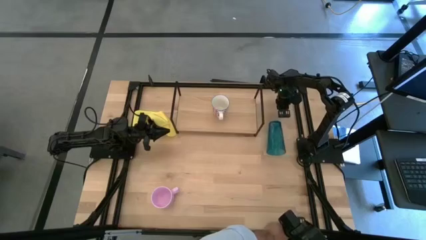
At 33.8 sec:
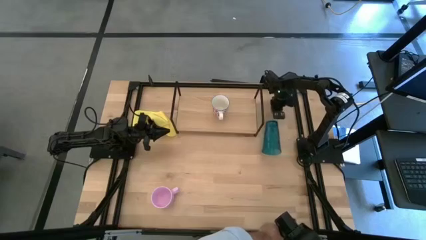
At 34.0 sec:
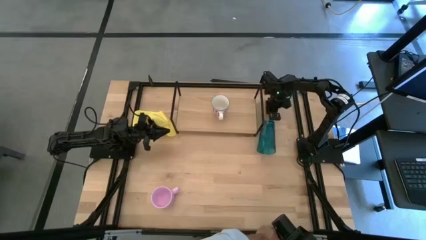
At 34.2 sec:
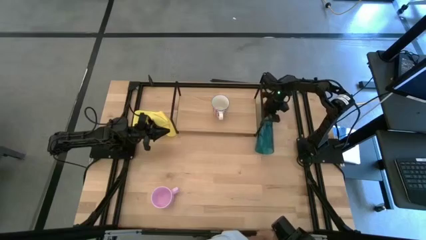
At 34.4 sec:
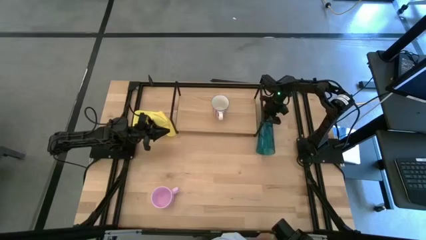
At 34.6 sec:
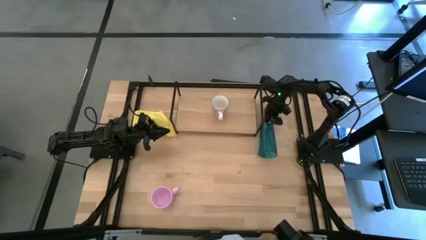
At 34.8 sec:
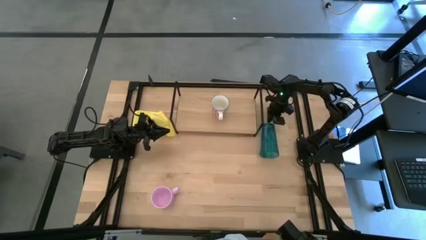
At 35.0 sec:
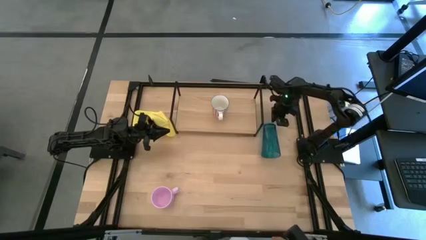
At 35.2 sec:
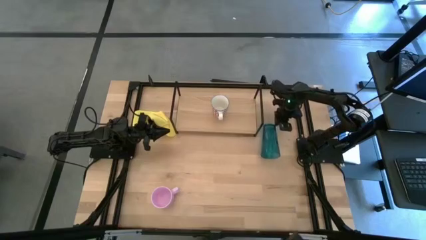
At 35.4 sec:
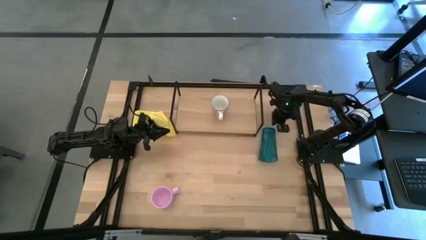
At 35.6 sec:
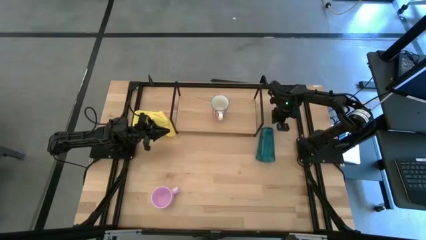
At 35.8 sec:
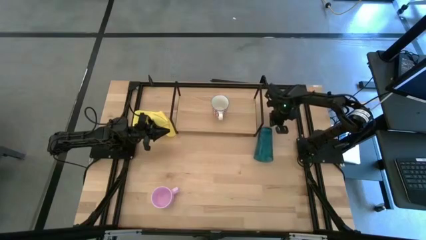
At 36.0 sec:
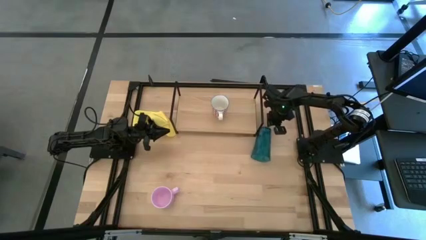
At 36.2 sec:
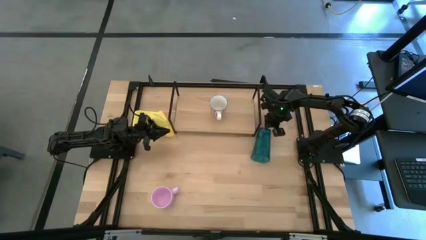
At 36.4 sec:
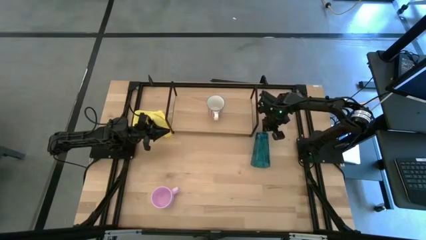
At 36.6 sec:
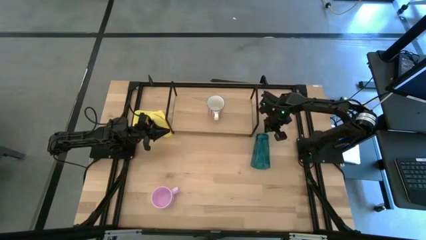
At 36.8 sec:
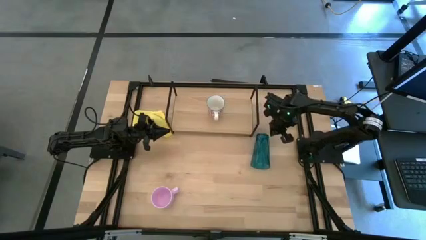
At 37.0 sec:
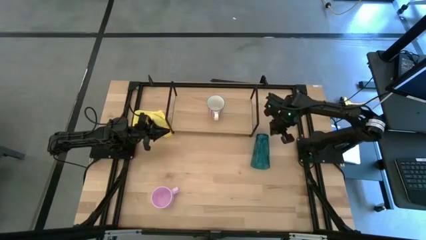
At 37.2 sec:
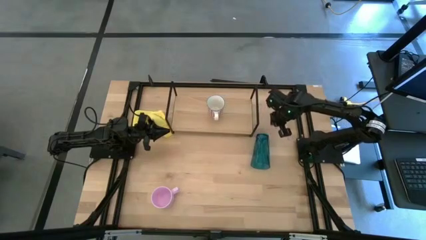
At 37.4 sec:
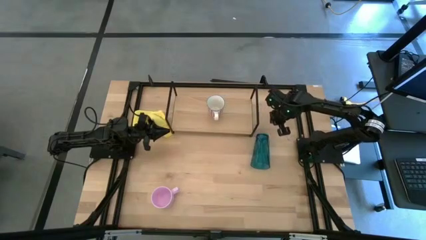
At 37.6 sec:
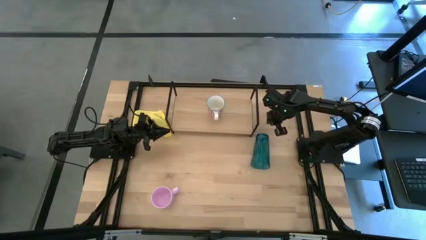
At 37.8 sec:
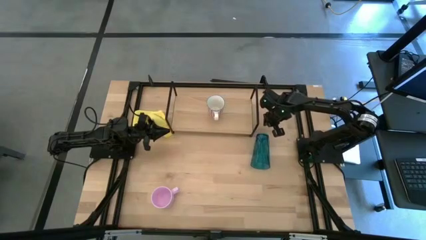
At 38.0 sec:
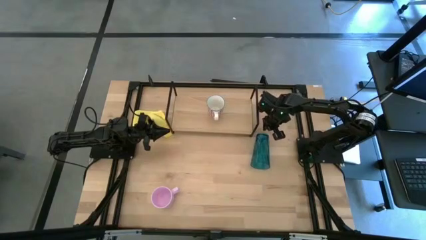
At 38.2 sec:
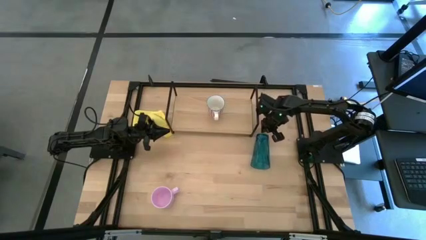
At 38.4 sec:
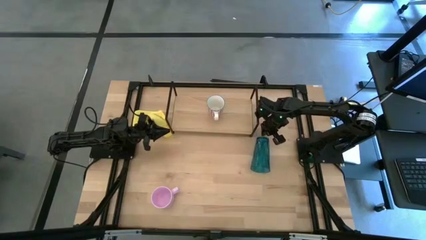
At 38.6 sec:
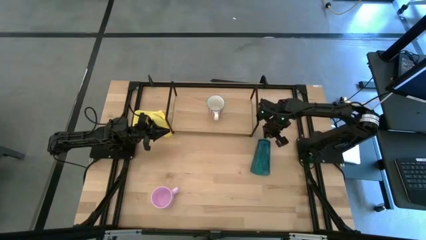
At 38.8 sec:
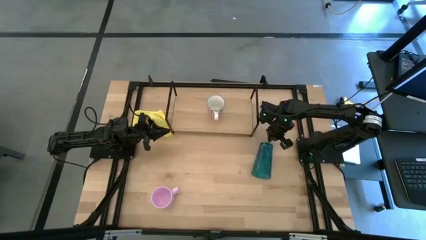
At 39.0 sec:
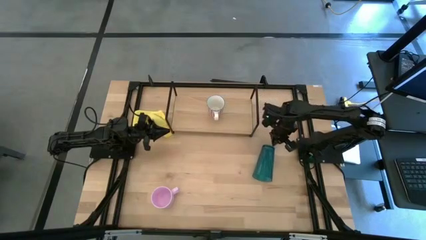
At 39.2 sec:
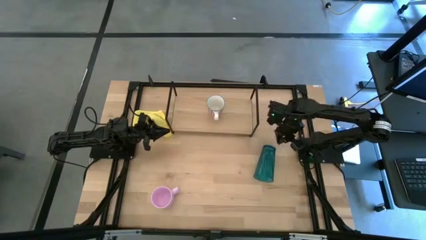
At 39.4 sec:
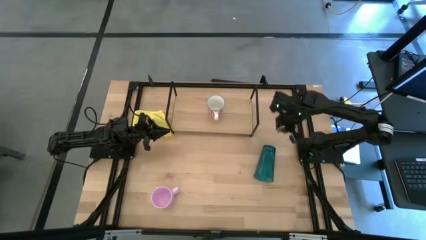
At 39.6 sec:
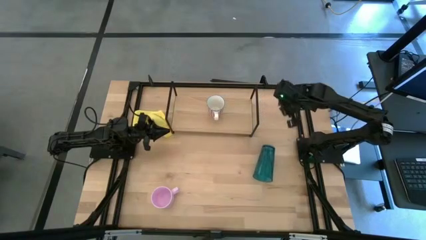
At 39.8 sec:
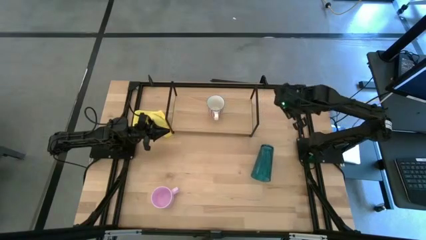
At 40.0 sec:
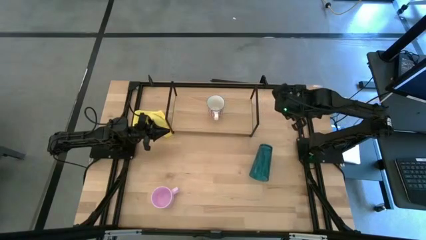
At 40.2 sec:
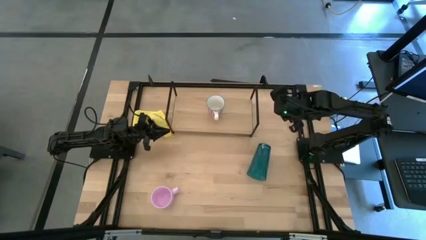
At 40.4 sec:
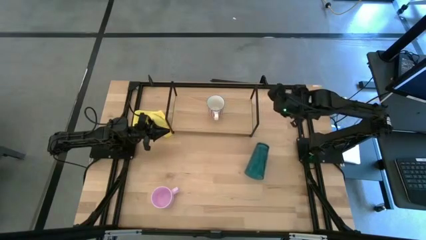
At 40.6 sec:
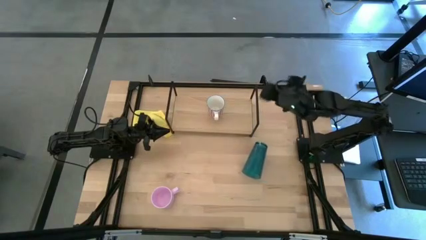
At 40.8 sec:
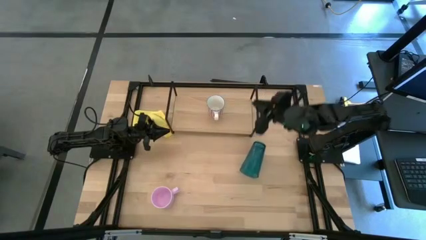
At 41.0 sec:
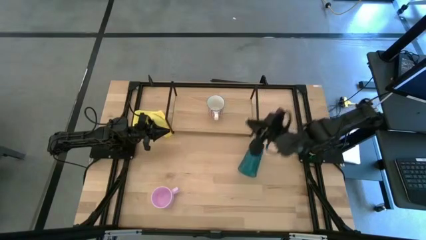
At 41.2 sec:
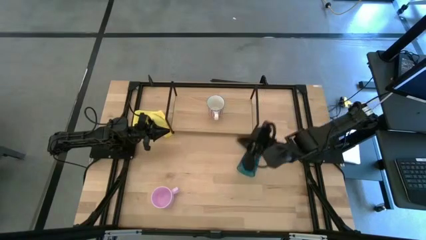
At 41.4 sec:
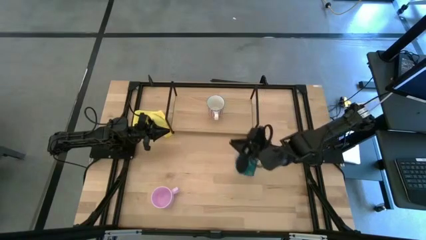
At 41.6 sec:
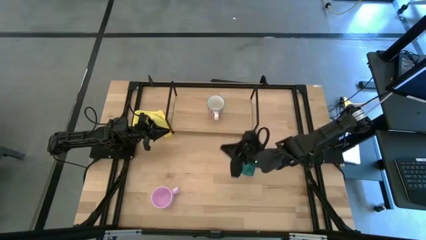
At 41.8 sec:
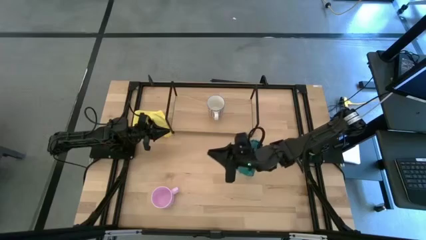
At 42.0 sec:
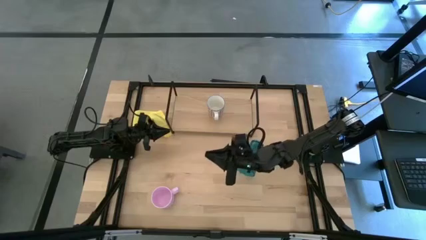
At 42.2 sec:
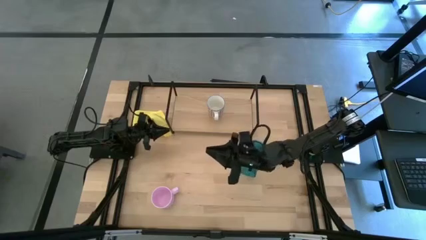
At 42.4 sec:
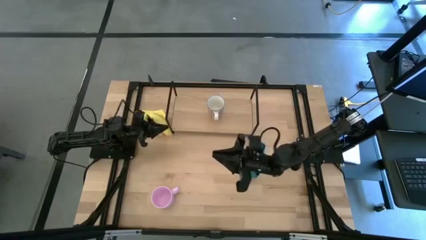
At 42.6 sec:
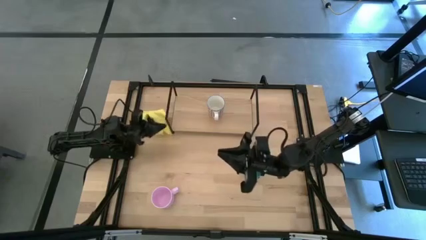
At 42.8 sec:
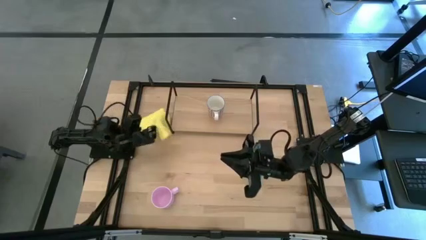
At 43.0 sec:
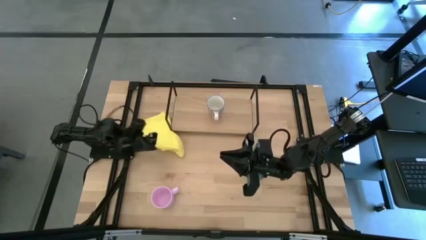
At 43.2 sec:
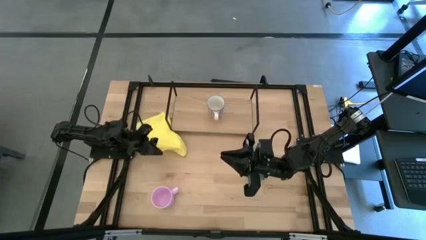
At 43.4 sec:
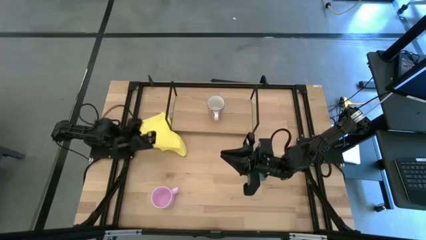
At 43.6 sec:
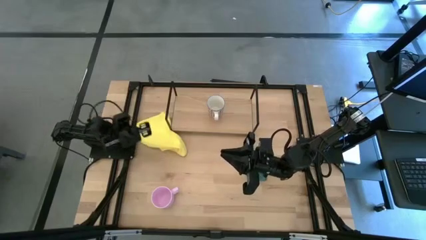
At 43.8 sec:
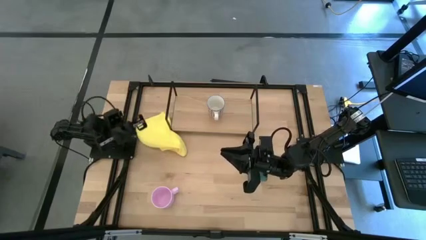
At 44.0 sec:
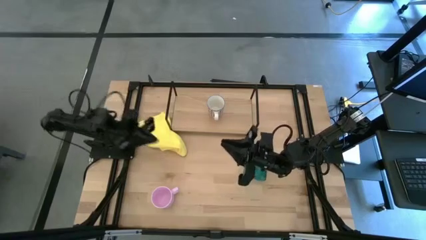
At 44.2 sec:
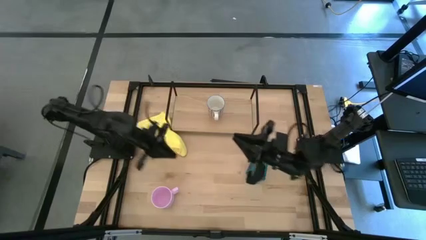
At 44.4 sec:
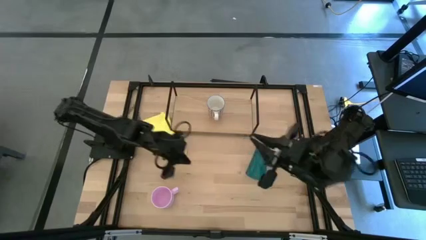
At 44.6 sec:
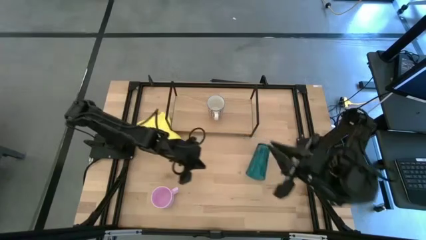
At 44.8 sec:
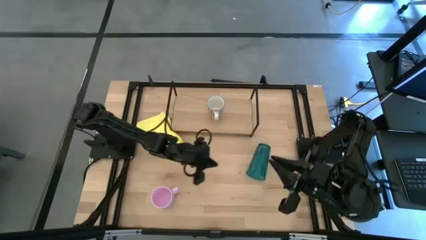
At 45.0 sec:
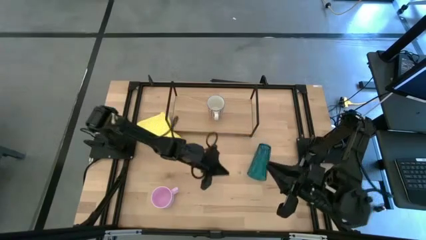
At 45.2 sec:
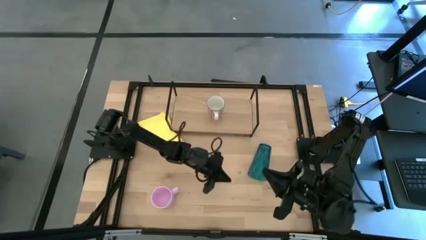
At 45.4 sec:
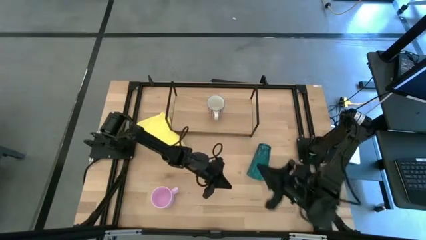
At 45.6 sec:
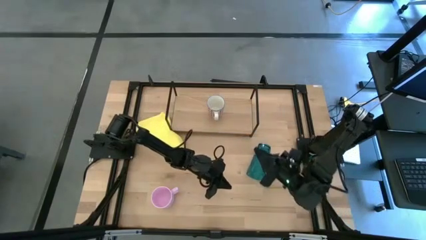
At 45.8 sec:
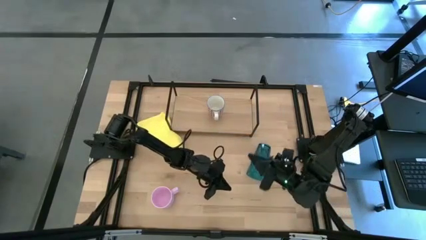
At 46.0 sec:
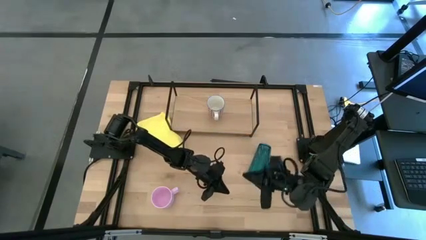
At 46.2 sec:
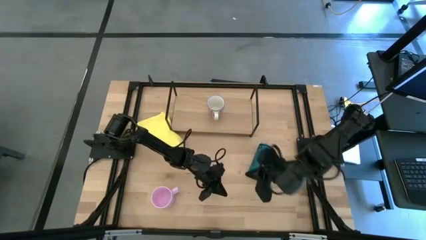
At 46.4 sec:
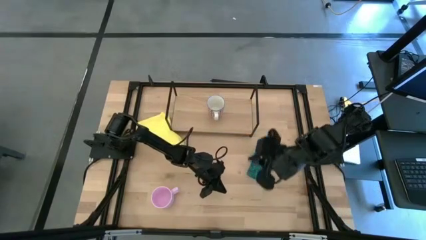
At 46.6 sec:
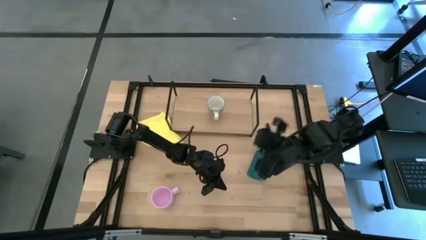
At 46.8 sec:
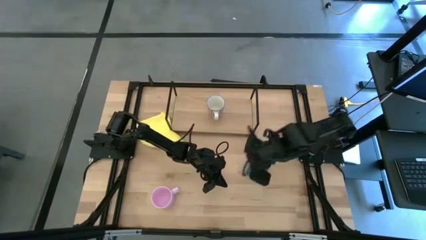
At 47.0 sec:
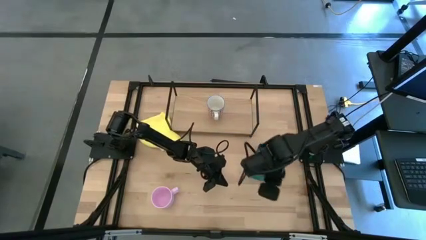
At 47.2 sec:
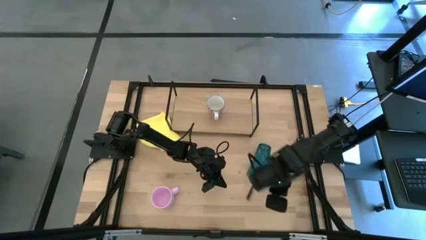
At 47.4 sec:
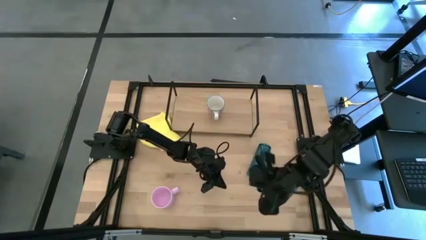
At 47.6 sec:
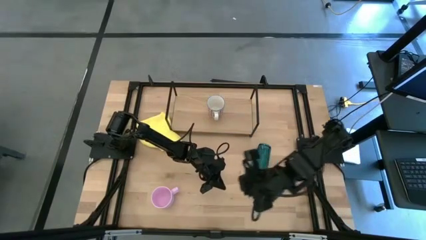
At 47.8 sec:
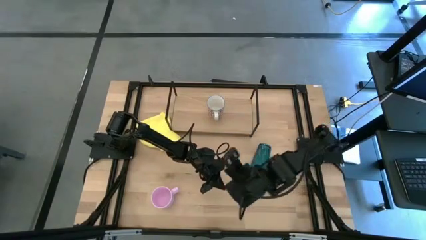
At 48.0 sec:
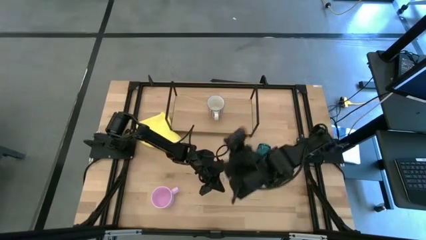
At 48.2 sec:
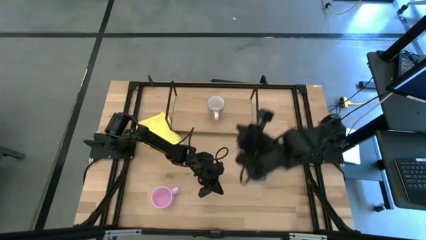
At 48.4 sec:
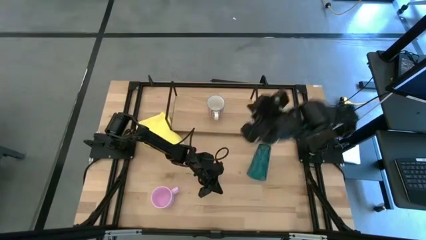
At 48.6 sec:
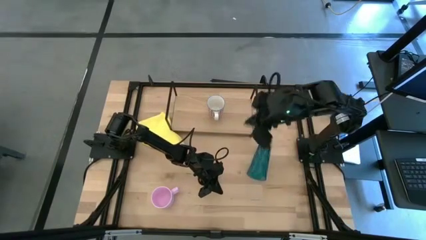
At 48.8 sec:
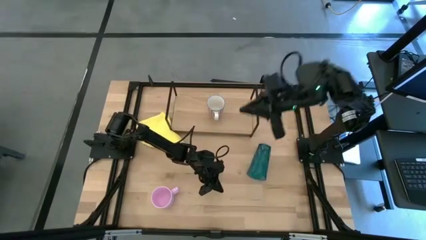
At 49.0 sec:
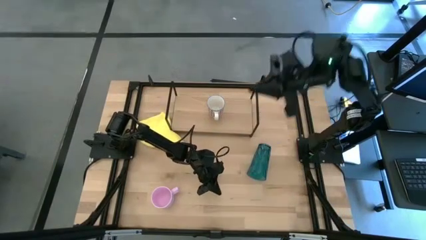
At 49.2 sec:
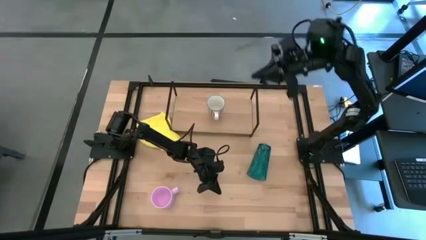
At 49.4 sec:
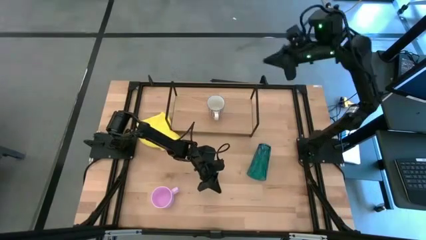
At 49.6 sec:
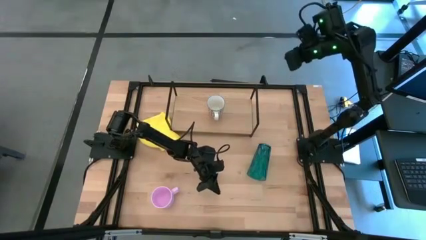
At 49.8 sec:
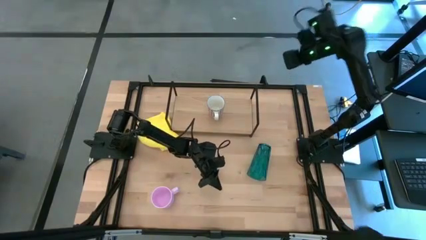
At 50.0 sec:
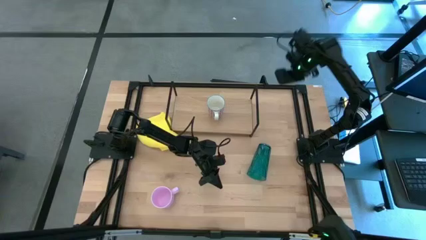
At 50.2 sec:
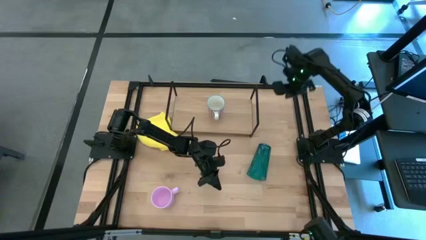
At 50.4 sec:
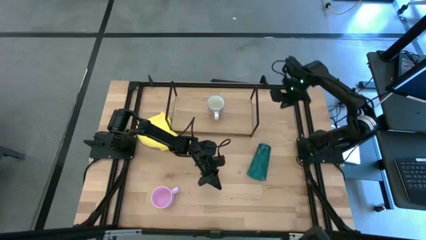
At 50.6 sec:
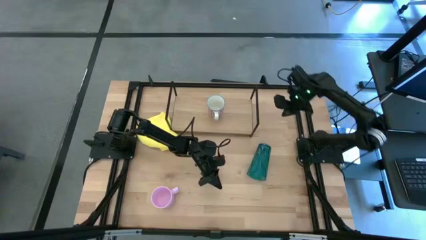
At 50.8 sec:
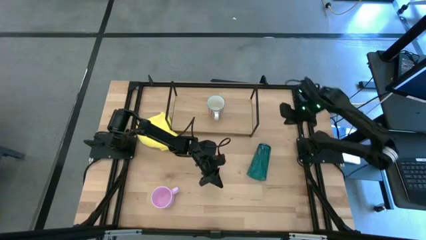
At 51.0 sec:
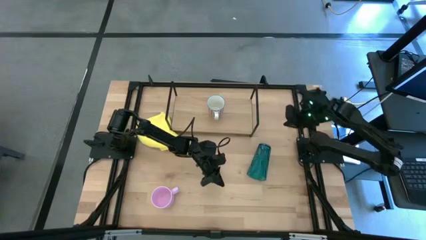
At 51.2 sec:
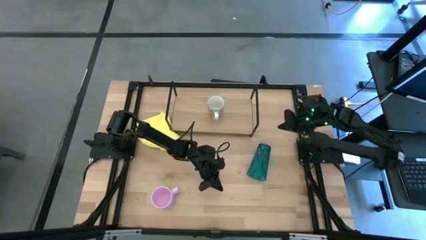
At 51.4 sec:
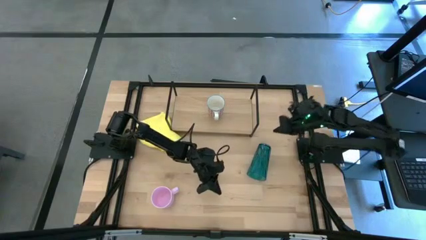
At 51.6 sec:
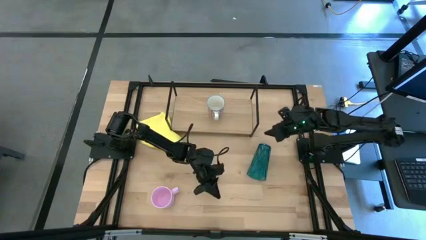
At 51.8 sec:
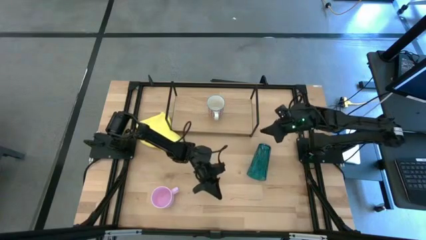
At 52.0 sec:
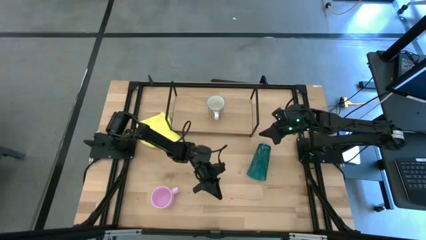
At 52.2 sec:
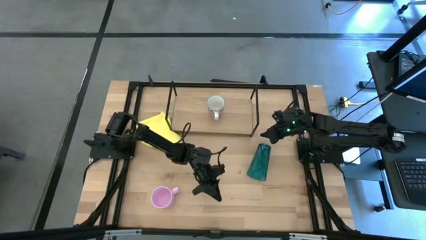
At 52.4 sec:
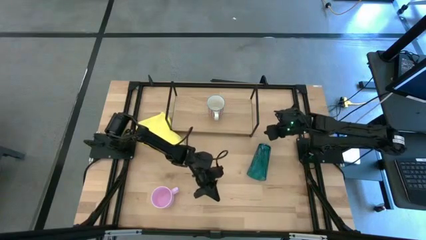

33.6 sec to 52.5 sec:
Task: Stack small to large cups/mugs on shelf
Put the blue cup on the shelf
